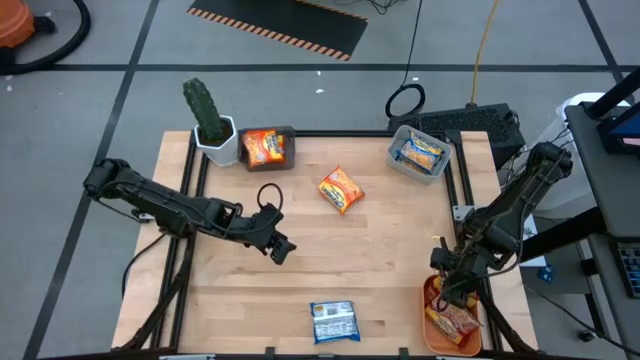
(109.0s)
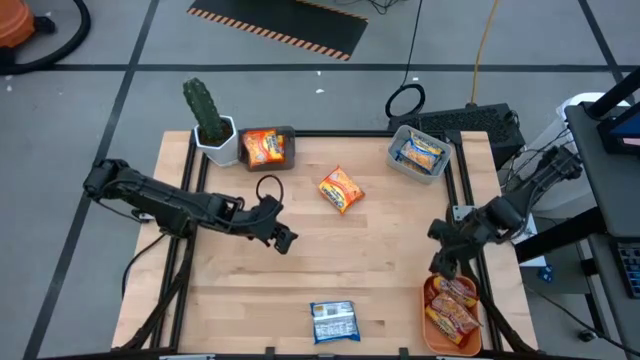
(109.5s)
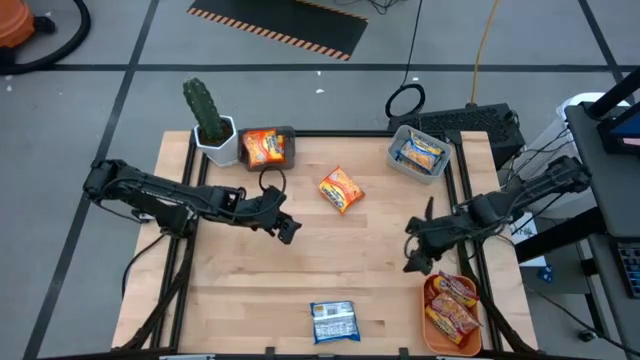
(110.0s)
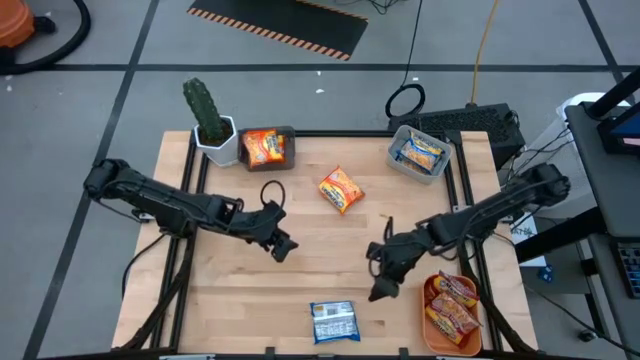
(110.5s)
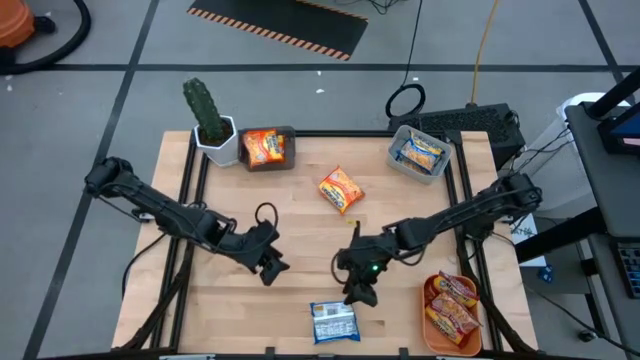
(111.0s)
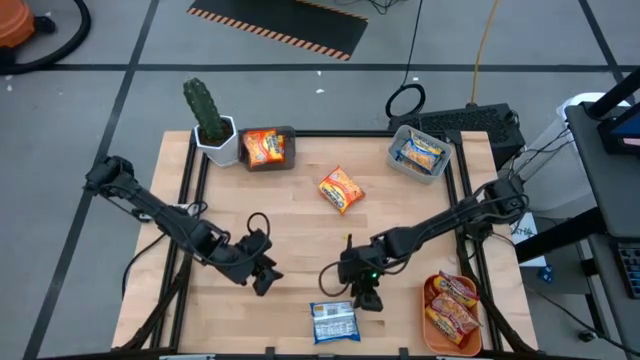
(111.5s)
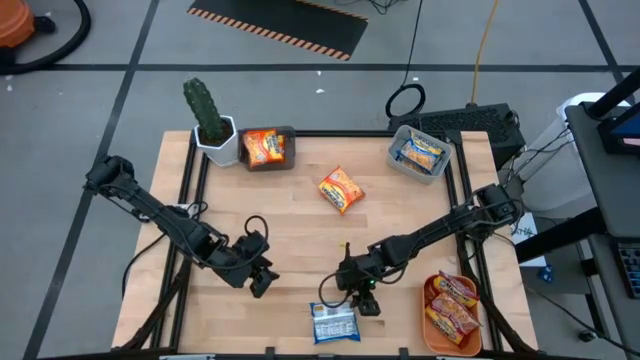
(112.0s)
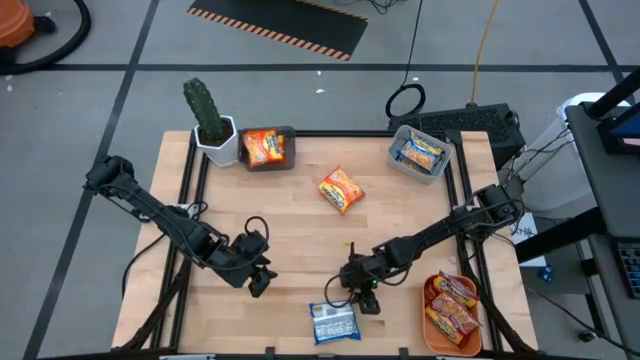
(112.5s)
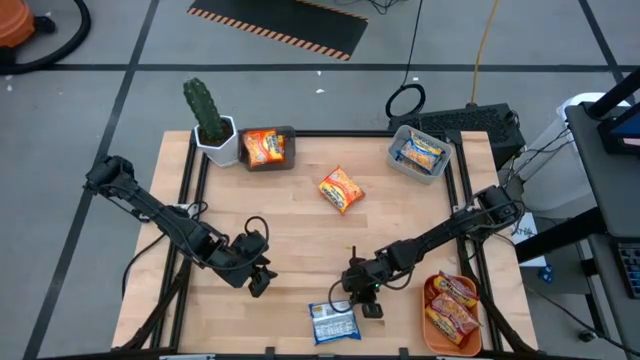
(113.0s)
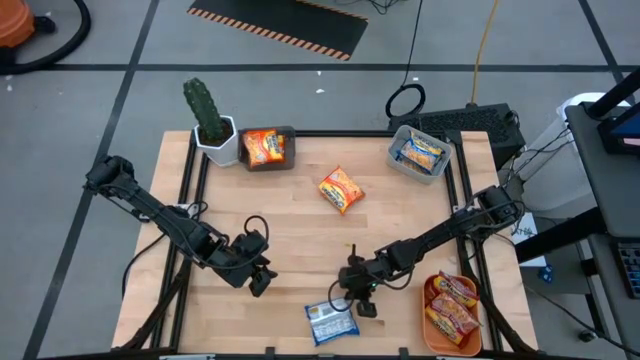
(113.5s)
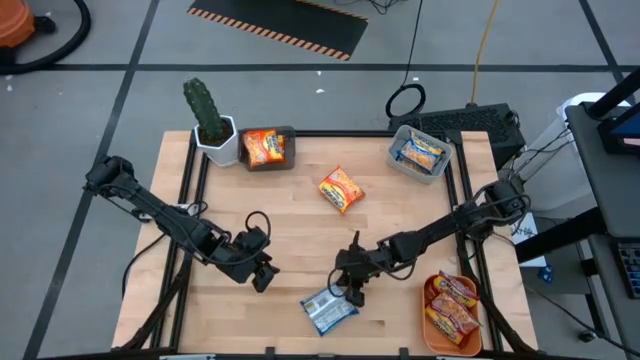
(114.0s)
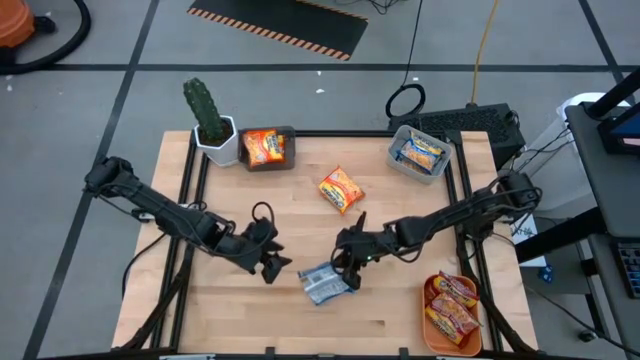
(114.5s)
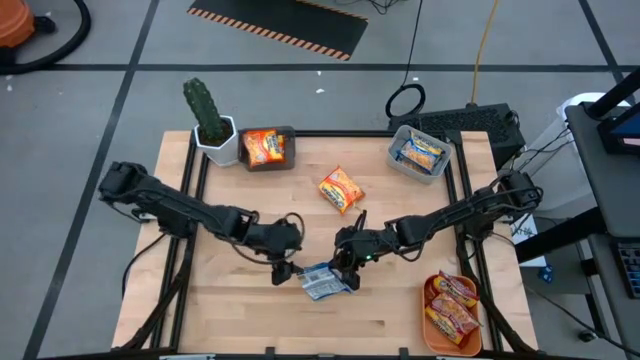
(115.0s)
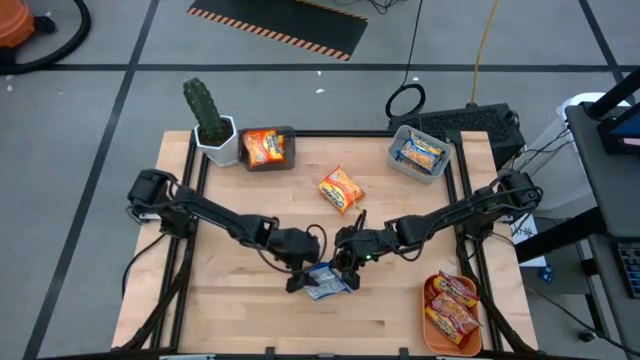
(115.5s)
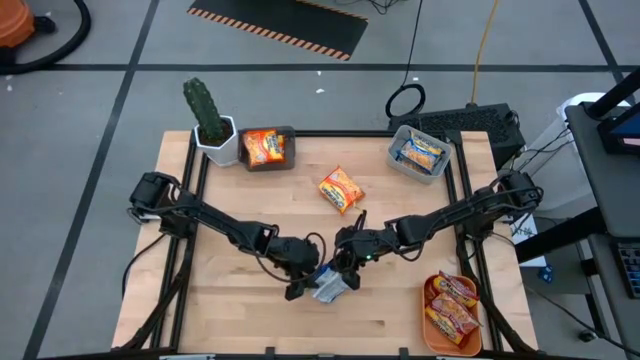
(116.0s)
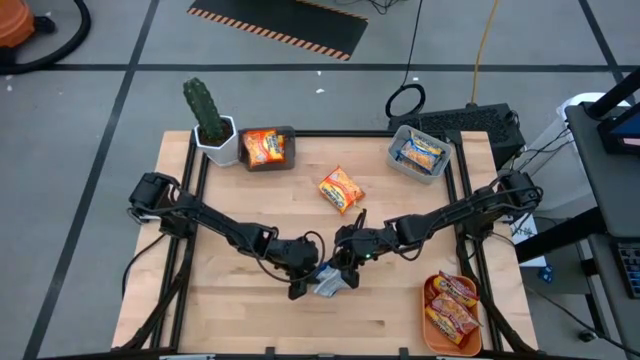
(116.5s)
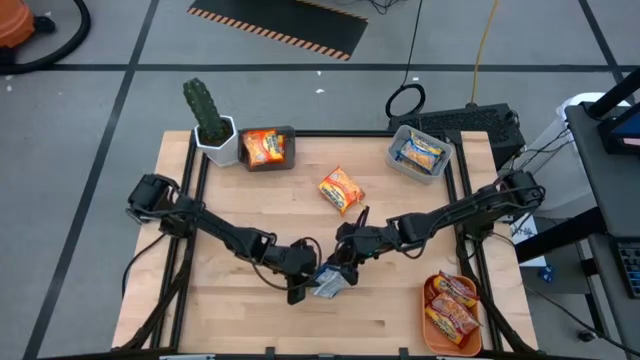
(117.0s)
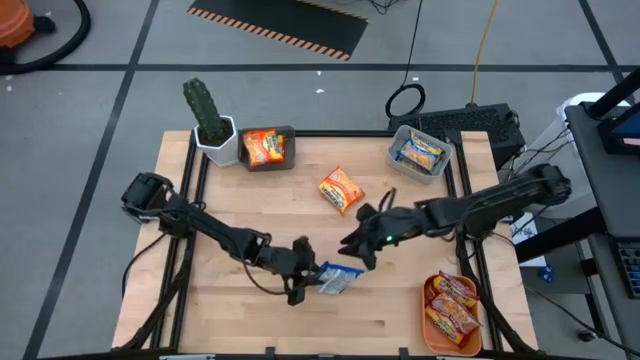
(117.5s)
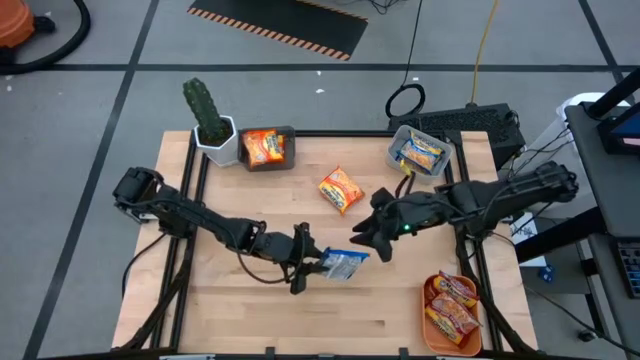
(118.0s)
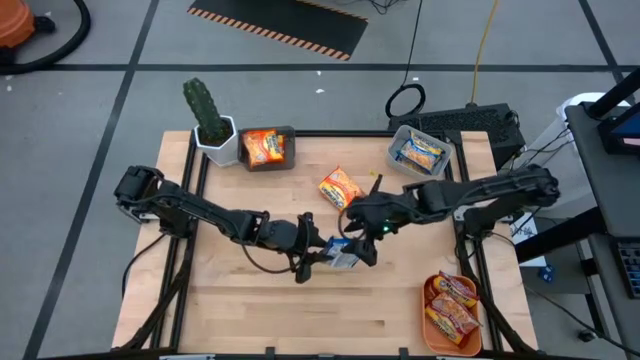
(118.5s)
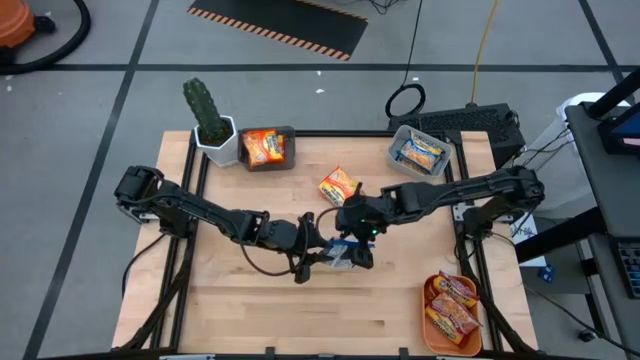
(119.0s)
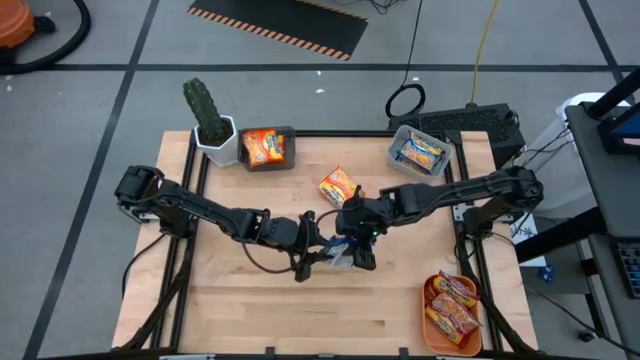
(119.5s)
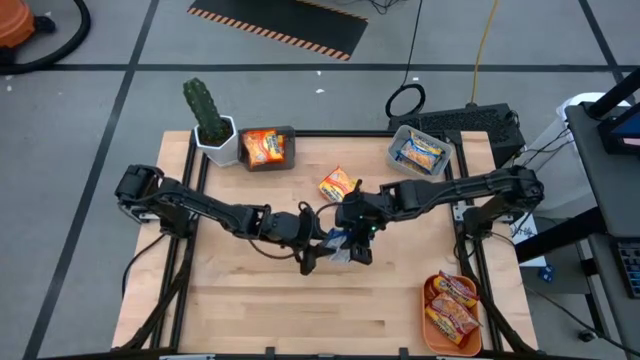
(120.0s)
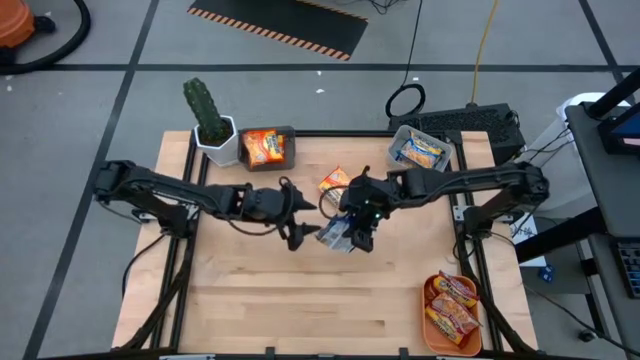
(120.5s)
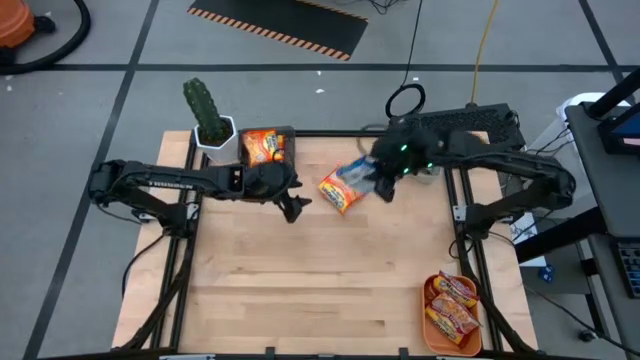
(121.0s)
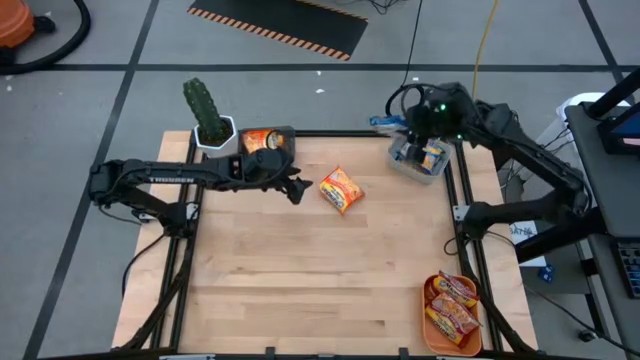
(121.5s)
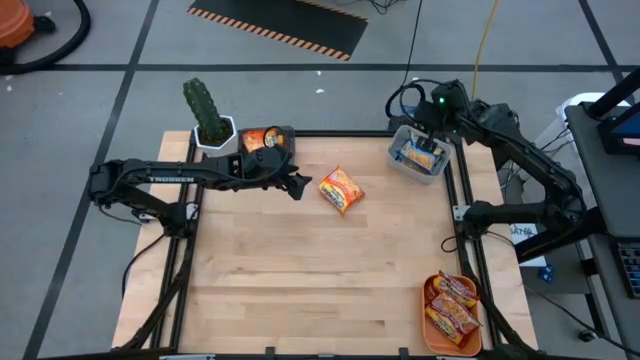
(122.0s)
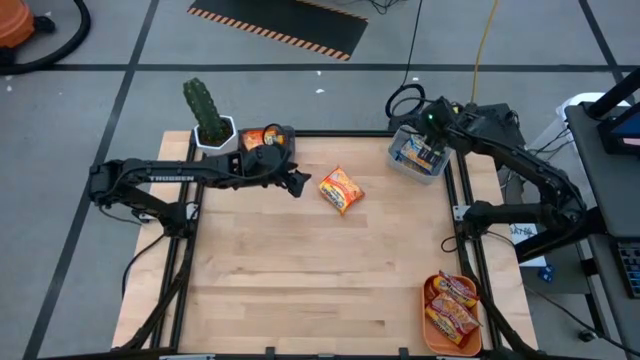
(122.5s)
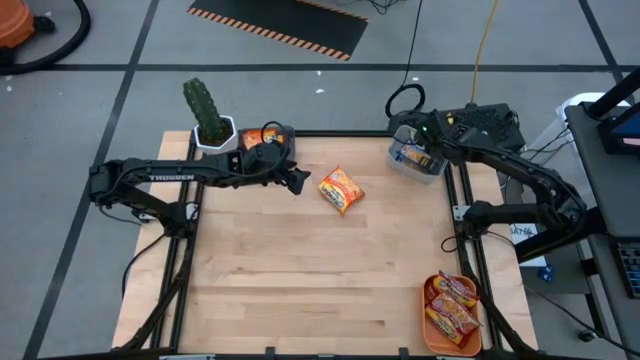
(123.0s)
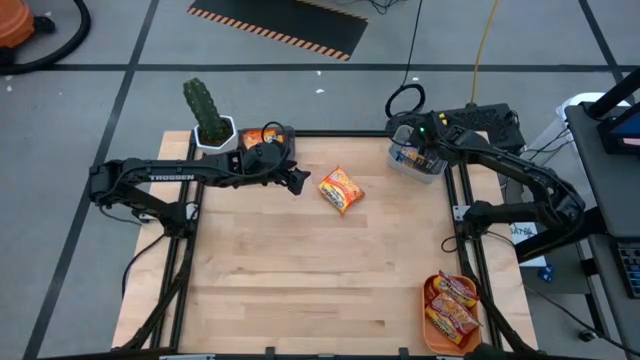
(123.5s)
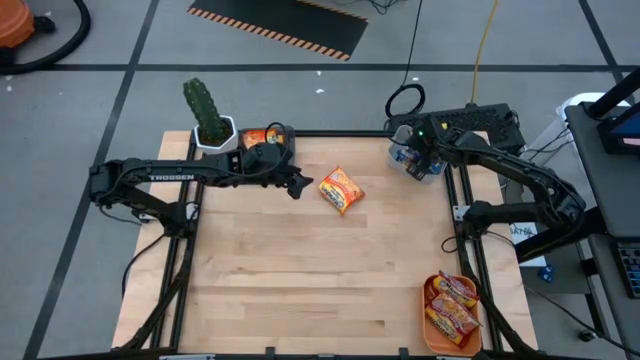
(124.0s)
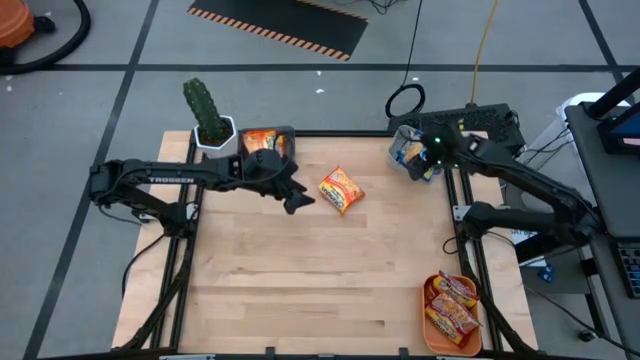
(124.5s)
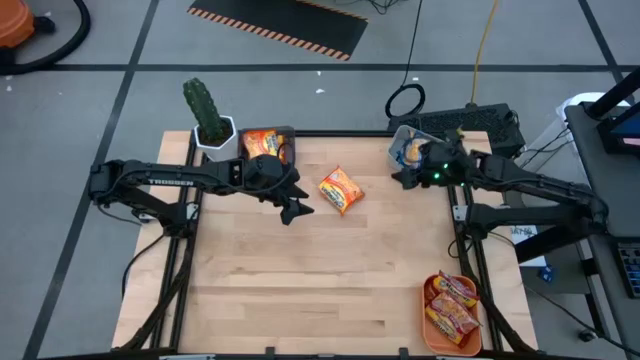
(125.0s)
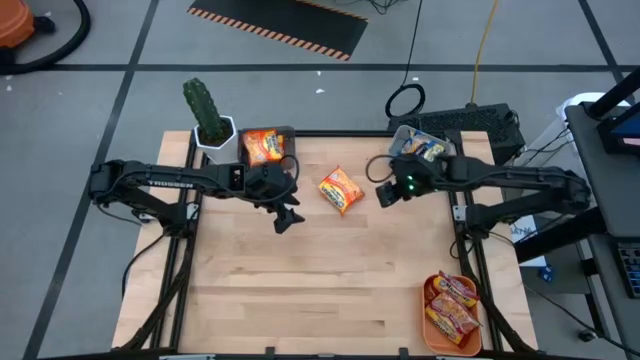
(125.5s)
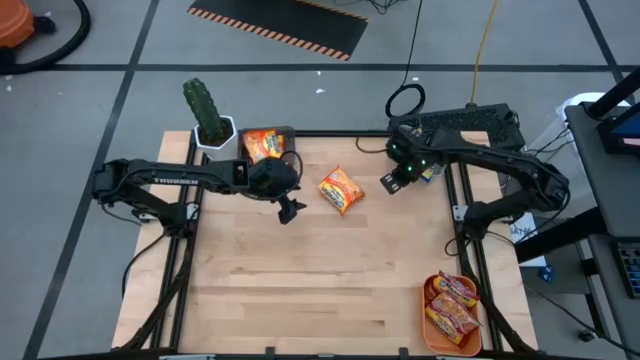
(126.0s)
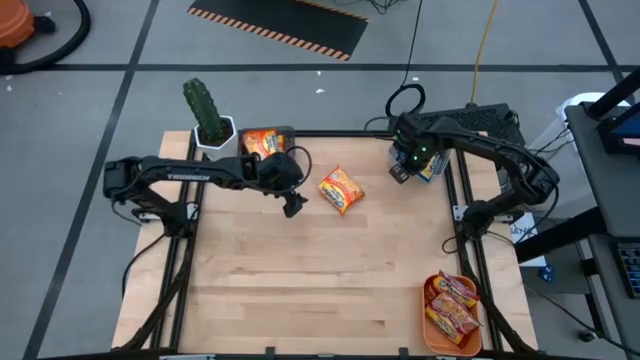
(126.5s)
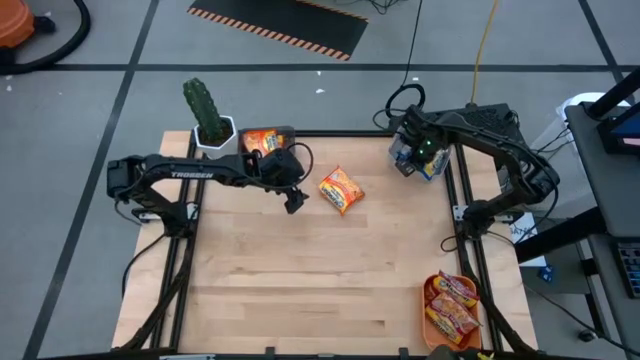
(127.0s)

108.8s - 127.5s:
Task: Sort Maruchan noodles
Put the blue noodle pack into the gray bin

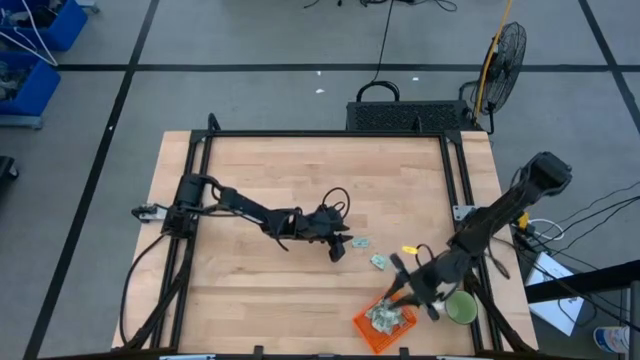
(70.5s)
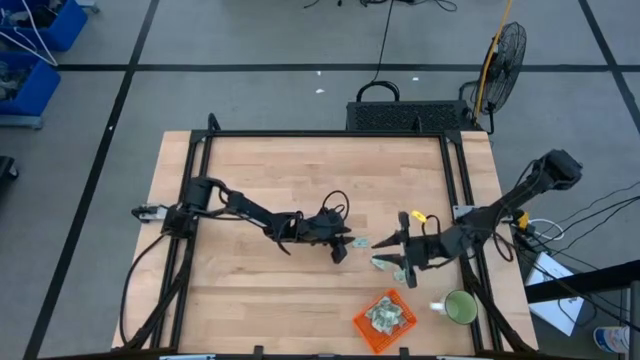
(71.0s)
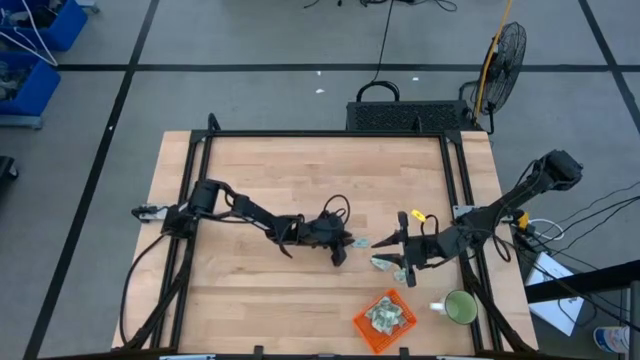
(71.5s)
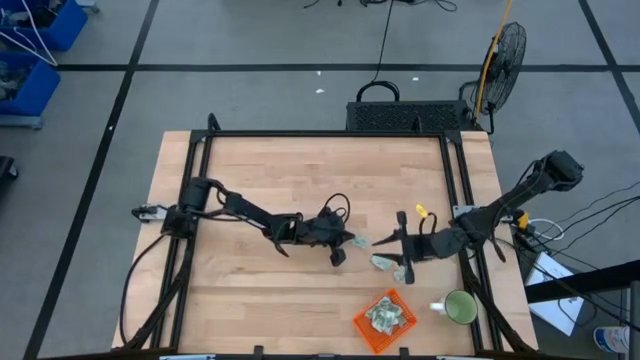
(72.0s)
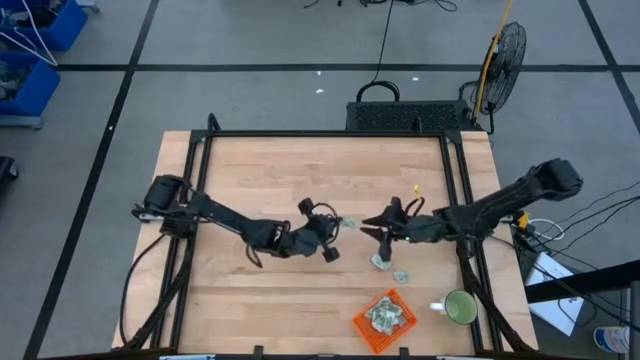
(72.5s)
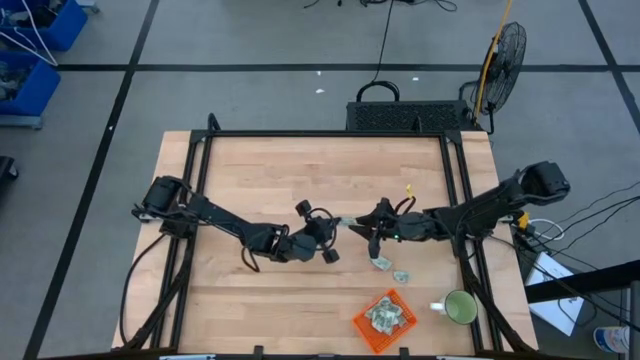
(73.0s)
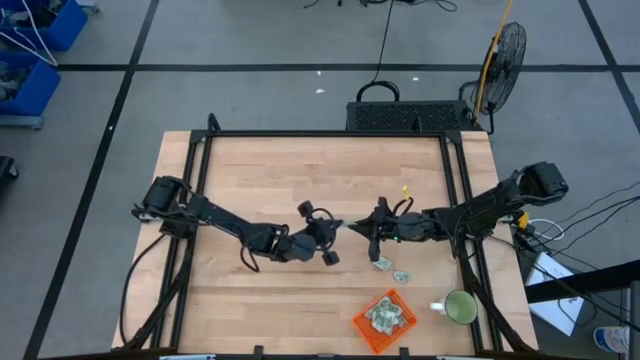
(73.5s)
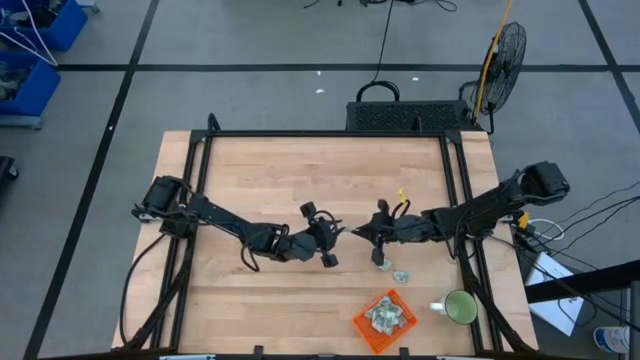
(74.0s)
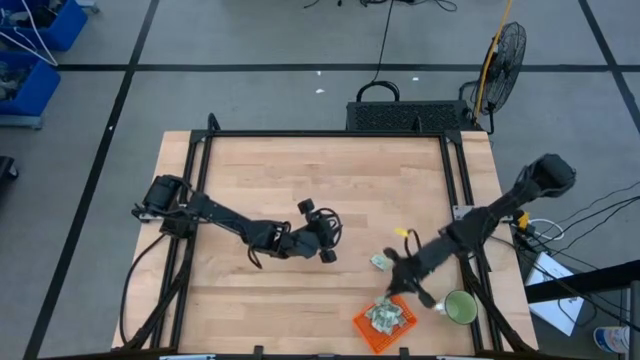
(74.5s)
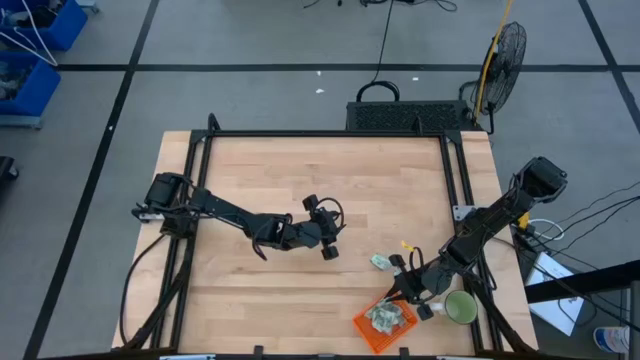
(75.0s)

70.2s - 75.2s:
Task: Pick and place Stevia / Truvia into bins
Put the stevia packet into the orange bin
